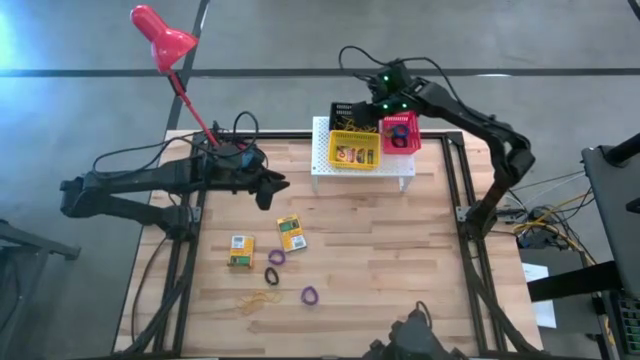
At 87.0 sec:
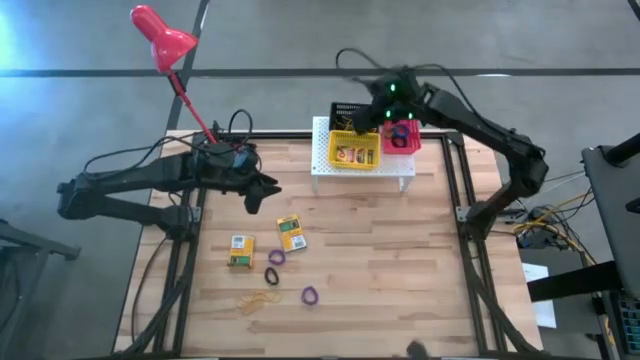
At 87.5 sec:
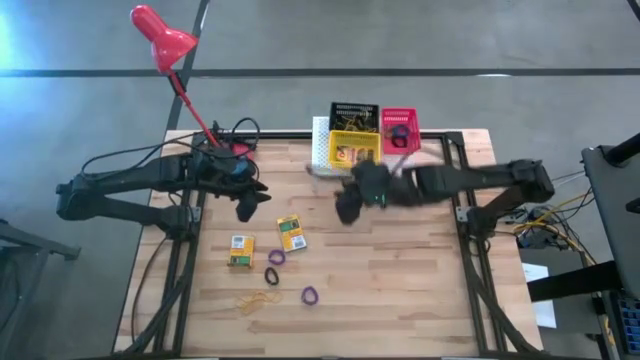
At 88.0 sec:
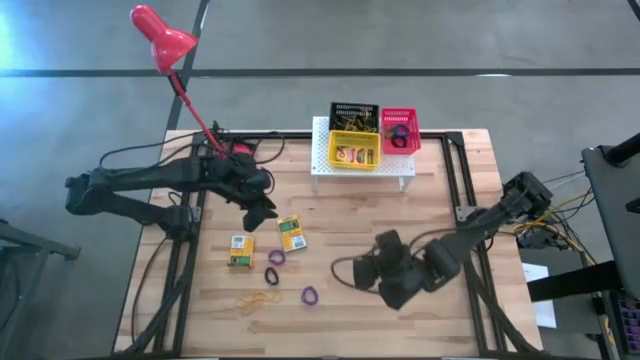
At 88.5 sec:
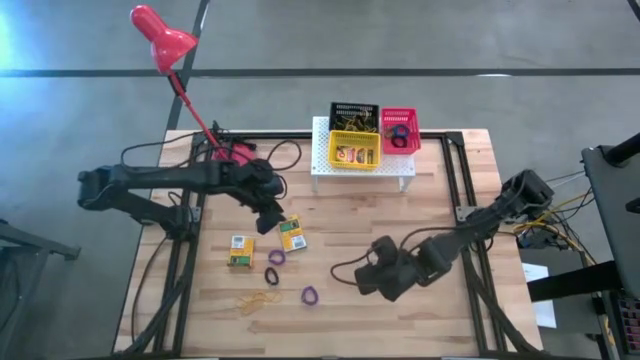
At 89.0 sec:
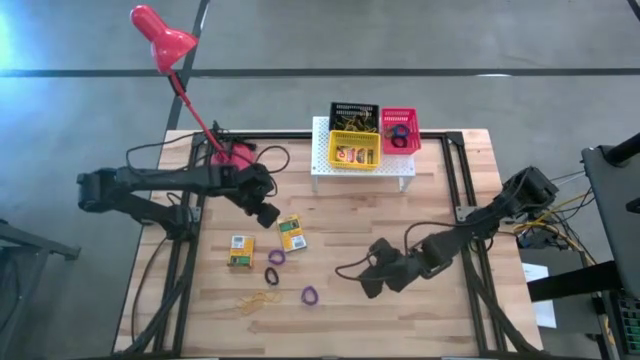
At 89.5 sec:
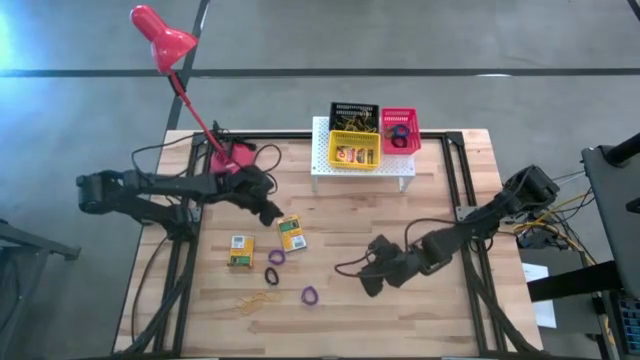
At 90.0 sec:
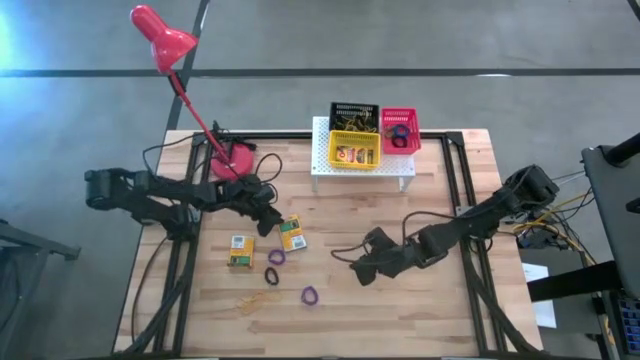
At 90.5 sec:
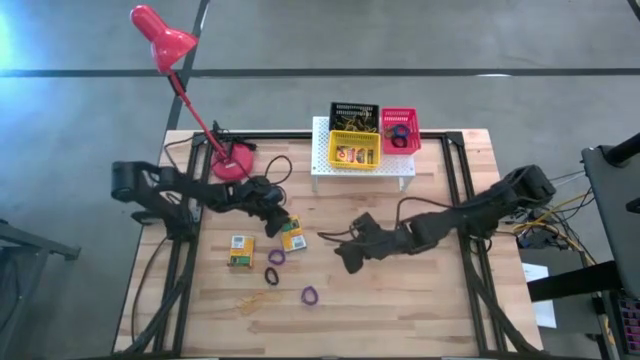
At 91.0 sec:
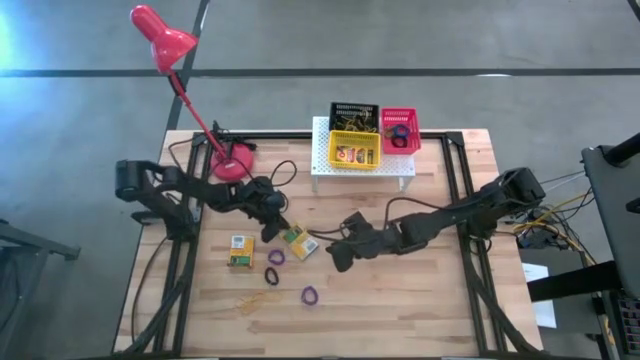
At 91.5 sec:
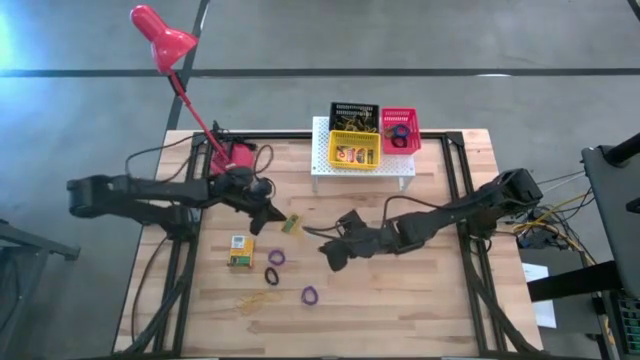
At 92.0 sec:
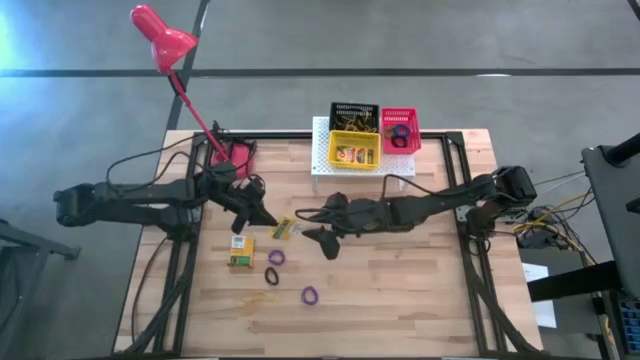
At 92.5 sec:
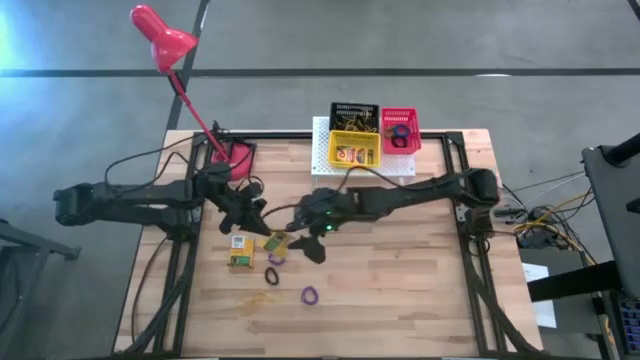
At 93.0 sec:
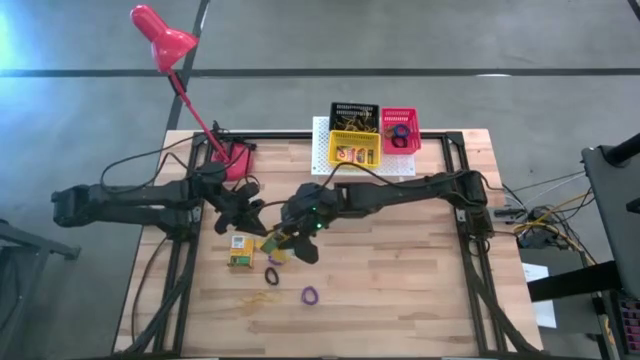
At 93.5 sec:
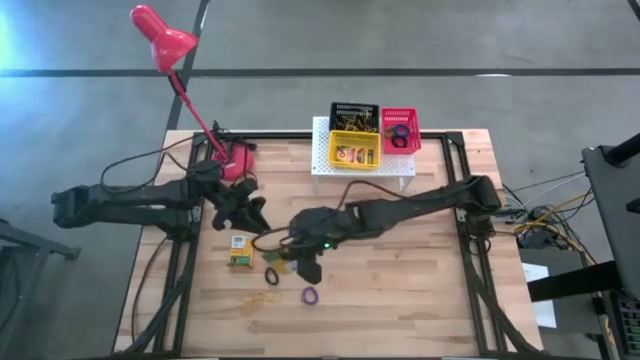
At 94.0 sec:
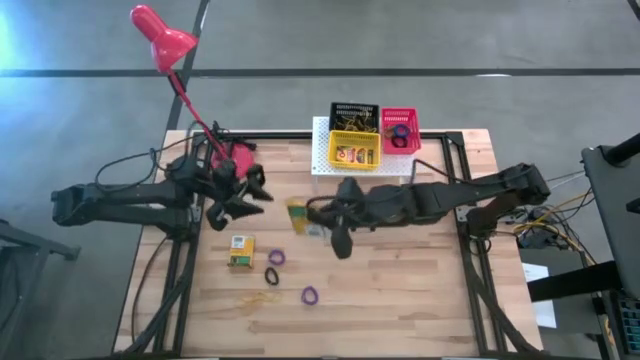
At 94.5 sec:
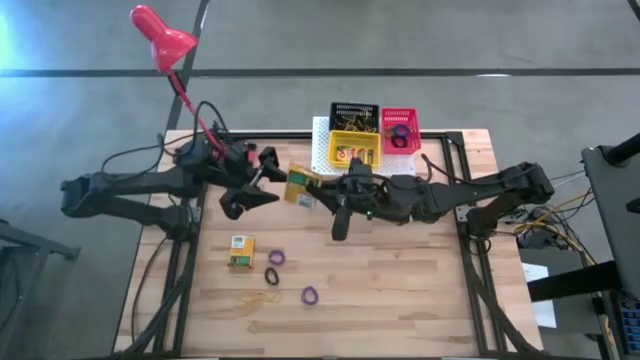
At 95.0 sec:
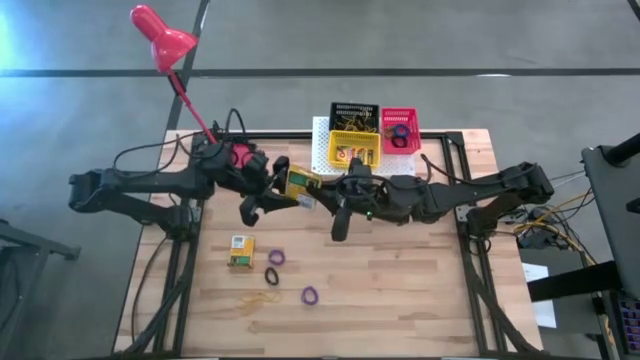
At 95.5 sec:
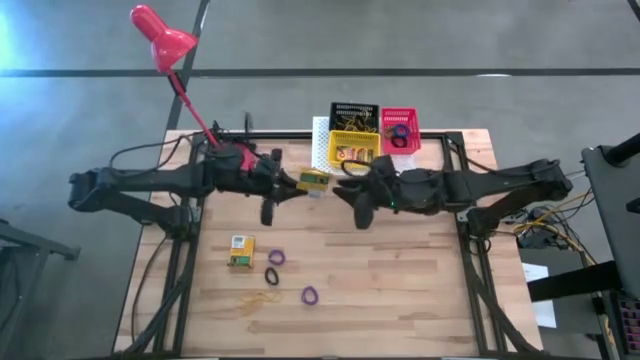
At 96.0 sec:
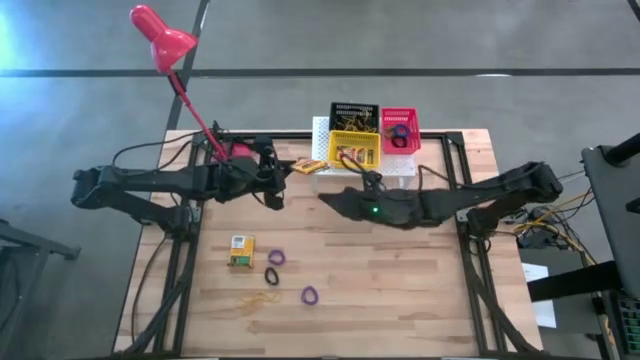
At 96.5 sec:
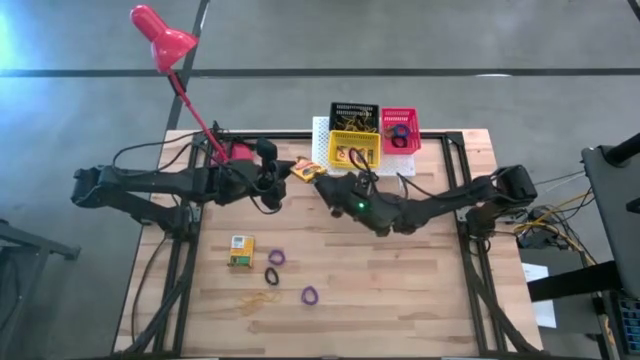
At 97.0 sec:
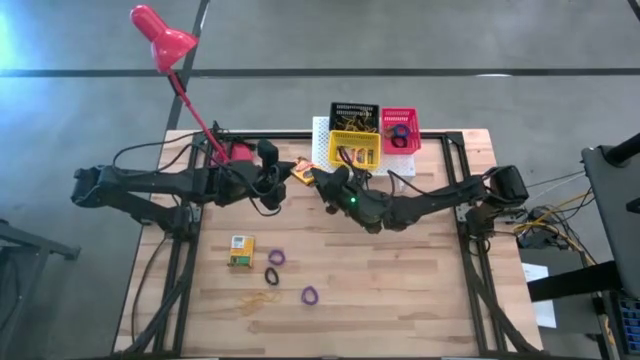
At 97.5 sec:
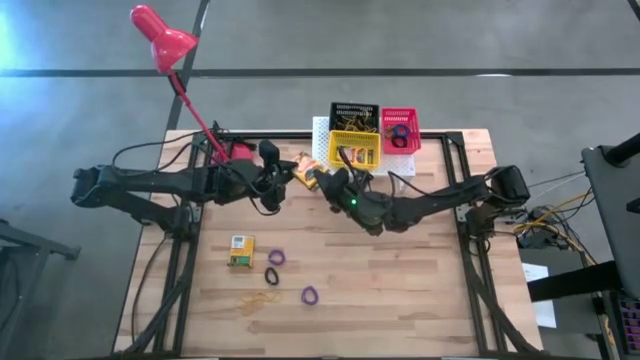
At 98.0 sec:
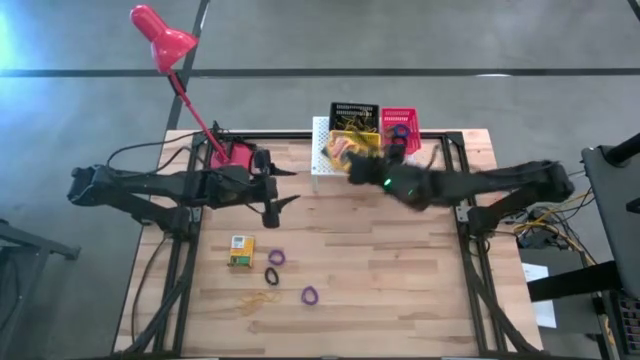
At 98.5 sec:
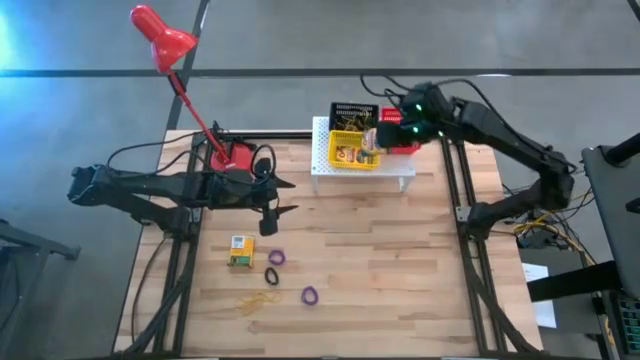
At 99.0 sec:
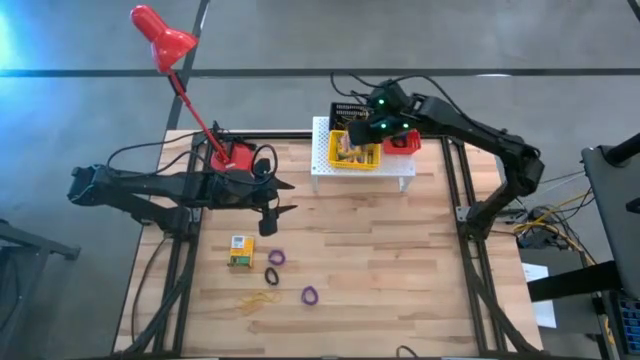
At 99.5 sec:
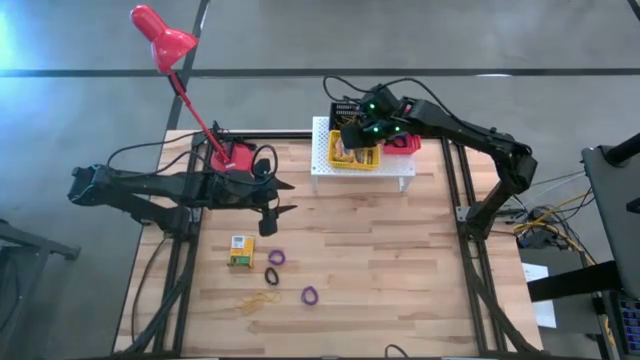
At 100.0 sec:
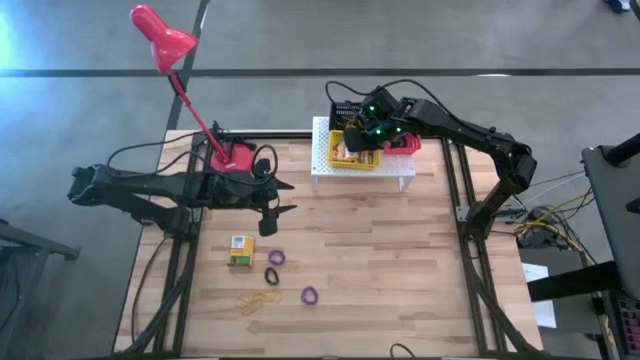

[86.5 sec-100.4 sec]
Task: Pick & Place Office Desk Supplies
Put the yellow crayon box in the yellow bin on the shelf

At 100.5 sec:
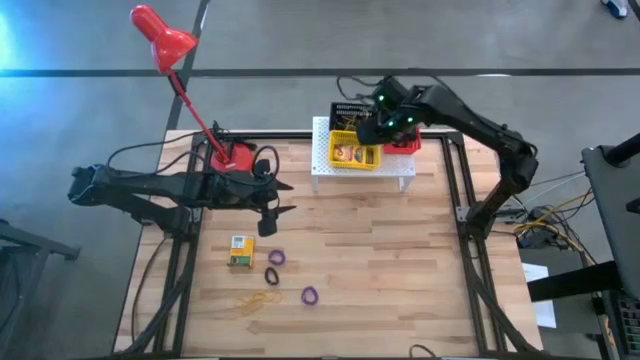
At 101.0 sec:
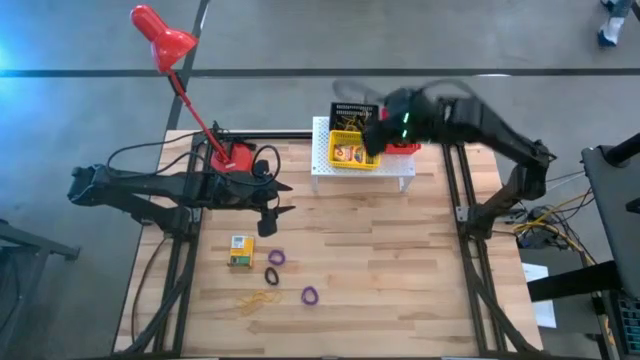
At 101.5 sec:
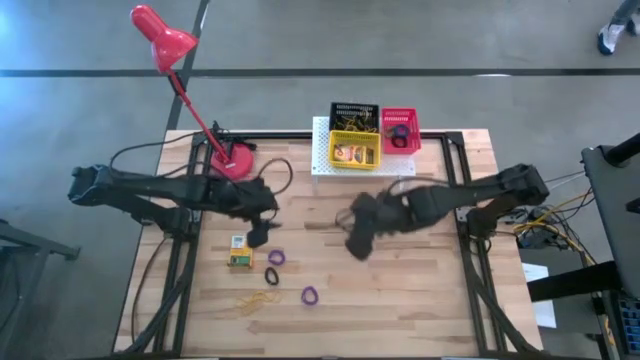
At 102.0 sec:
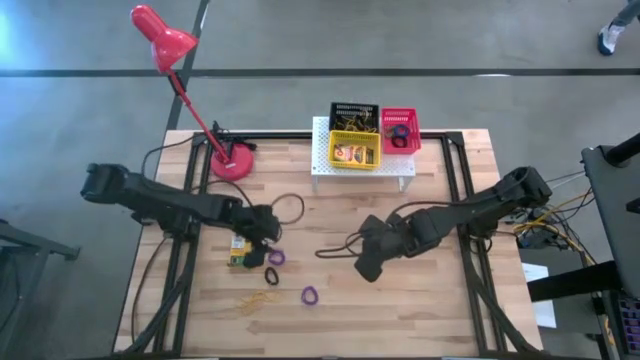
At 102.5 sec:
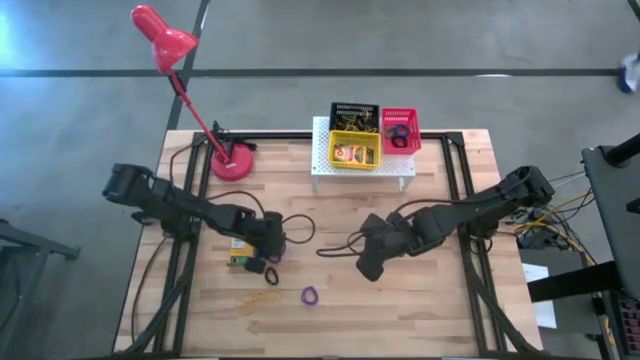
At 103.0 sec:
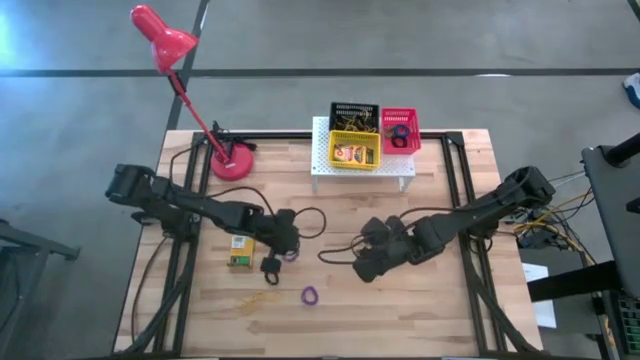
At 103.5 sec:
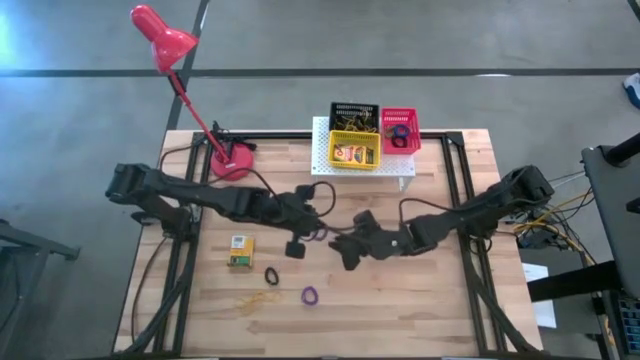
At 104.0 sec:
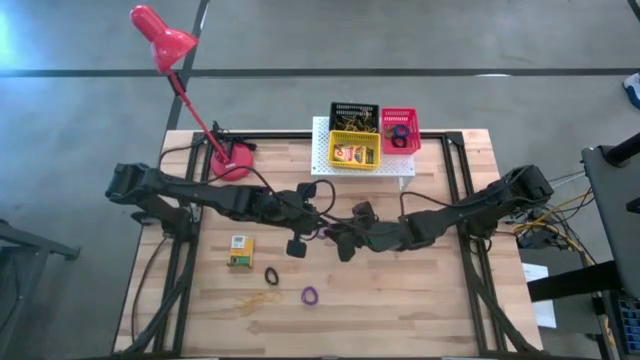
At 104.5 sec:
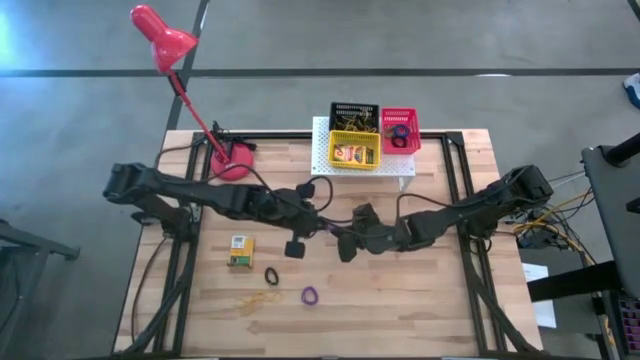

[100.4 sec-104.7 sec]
Put the purple spring keychain in the red bin on the shelf

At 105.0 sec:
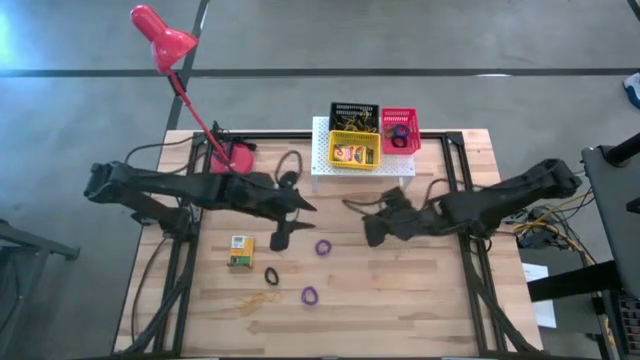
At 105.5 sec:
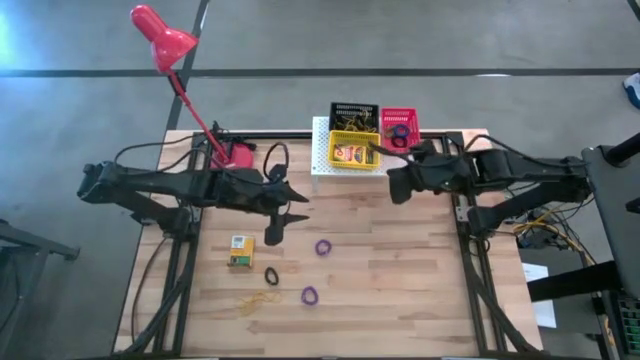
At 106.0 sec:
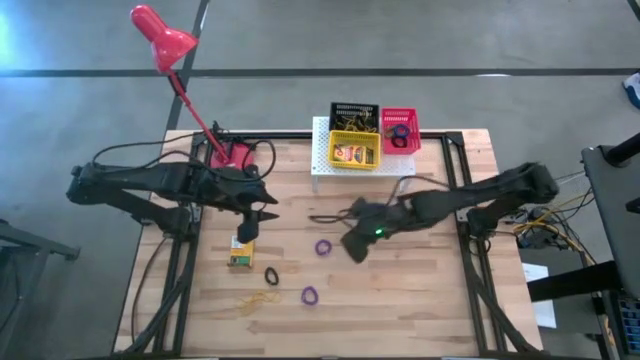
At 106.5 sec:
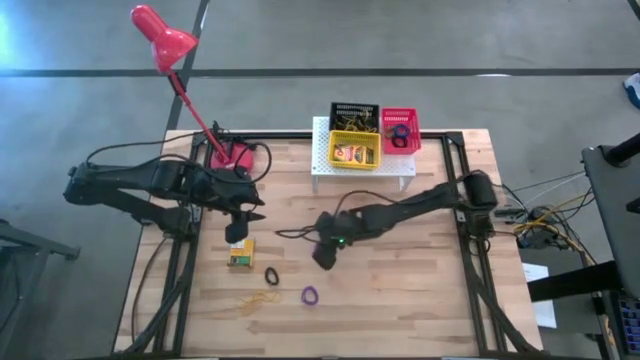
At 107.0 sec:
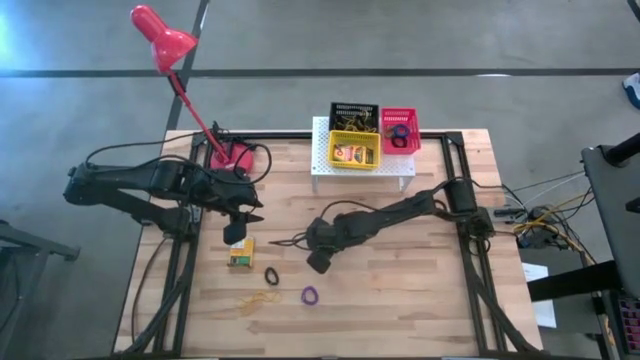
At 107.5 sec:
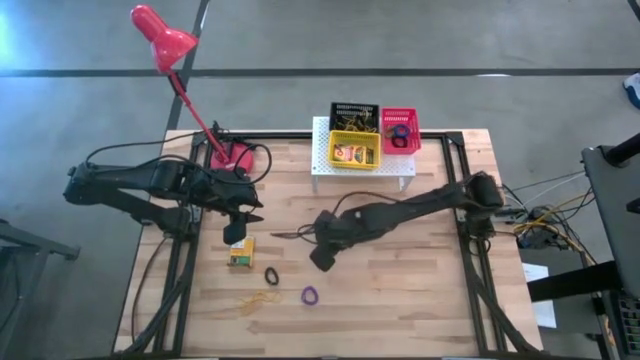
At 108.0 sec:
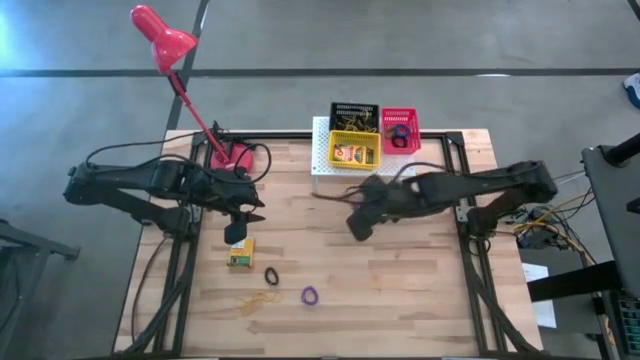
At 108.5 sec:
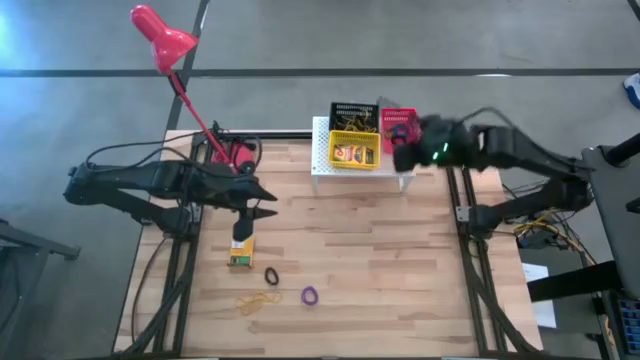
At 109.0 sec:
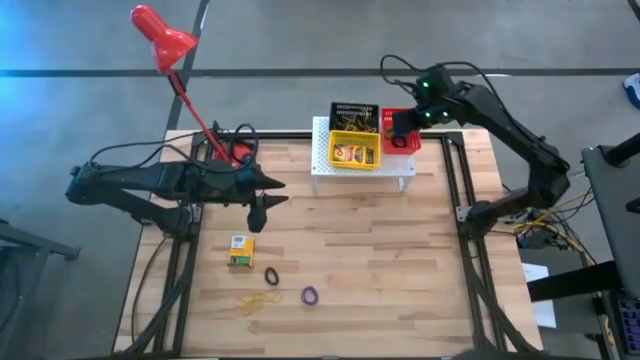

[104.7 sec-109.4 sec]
Put the purple spring keychain in the red bin on the shelf
